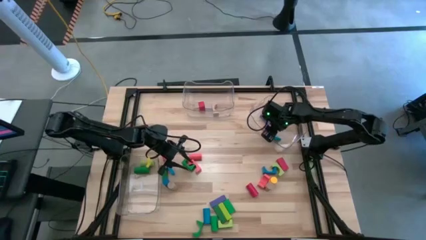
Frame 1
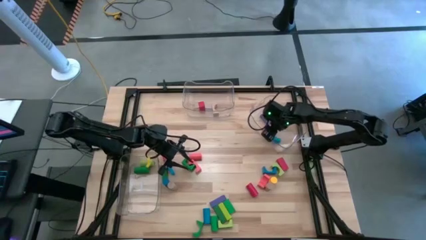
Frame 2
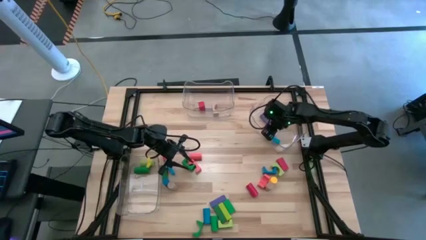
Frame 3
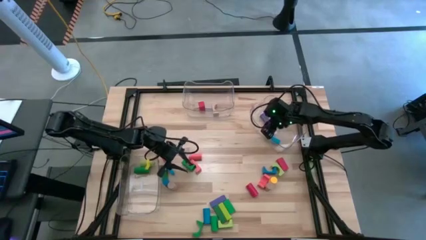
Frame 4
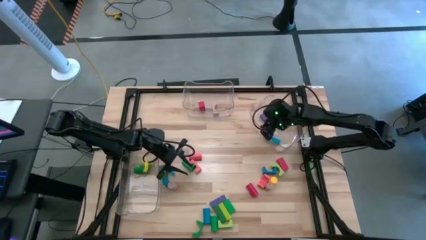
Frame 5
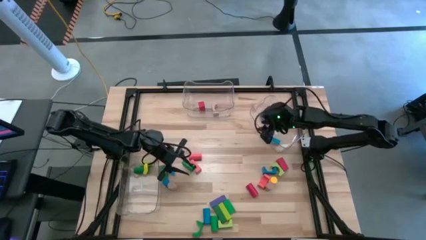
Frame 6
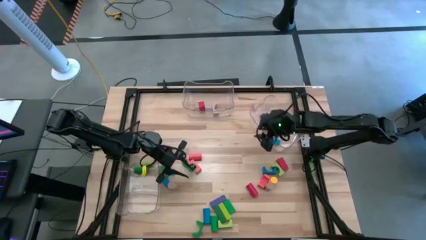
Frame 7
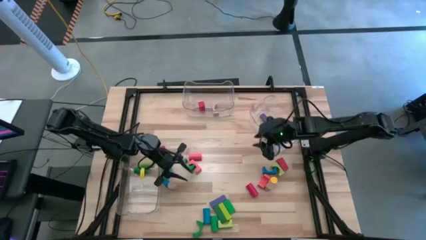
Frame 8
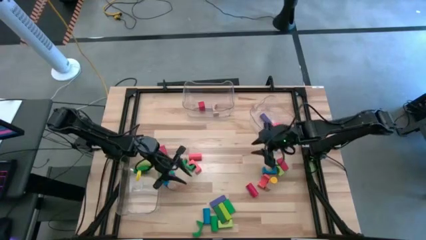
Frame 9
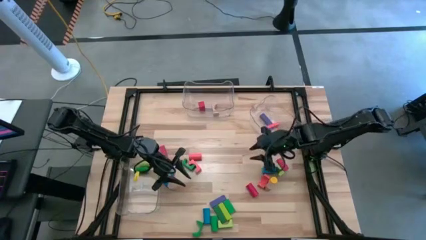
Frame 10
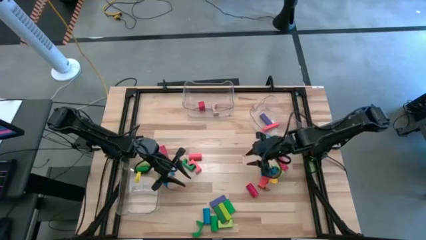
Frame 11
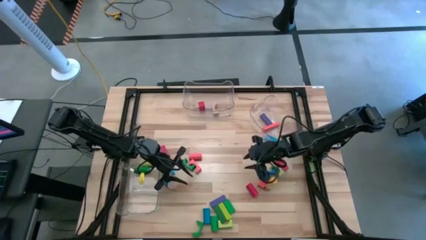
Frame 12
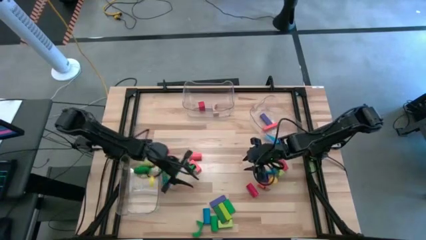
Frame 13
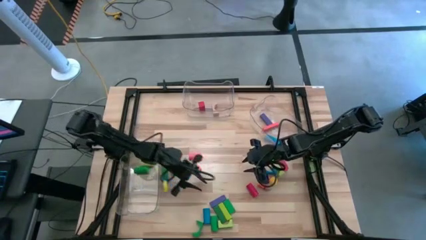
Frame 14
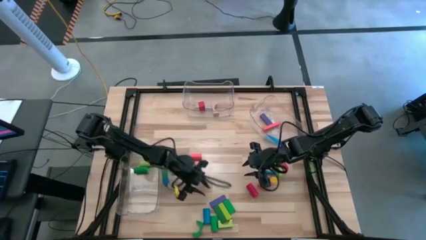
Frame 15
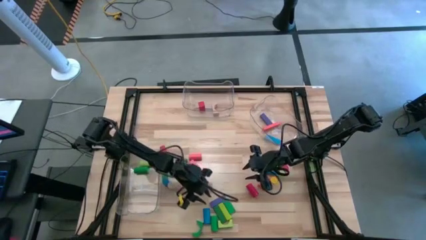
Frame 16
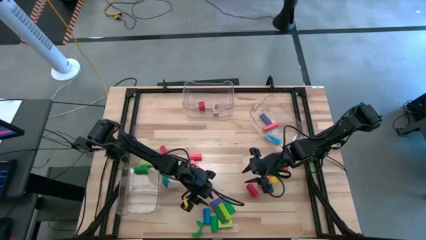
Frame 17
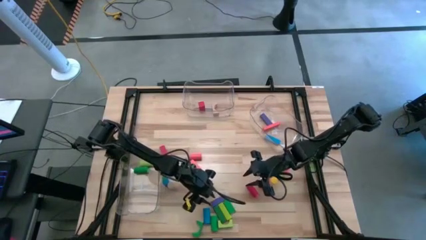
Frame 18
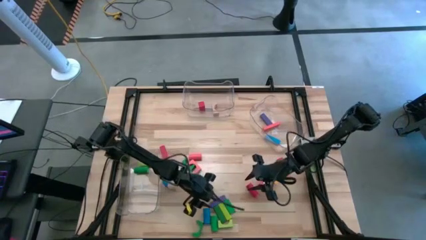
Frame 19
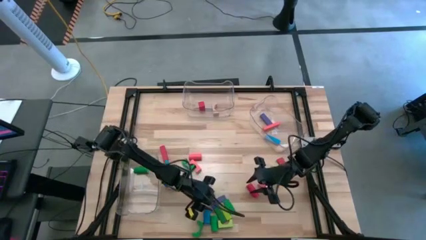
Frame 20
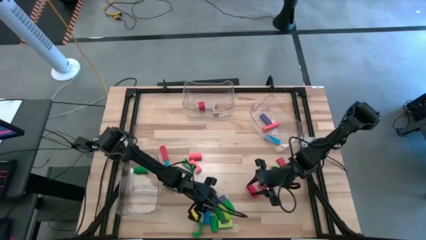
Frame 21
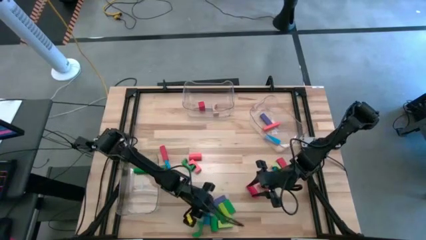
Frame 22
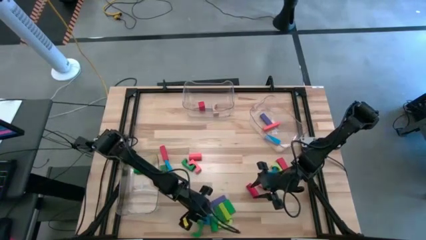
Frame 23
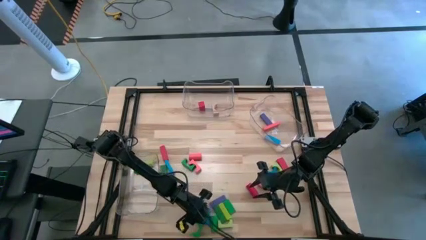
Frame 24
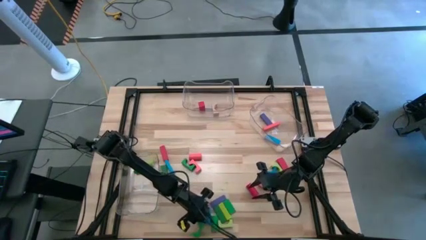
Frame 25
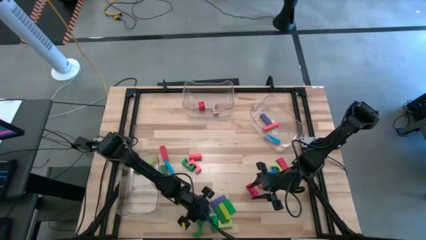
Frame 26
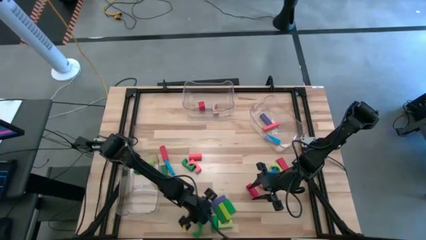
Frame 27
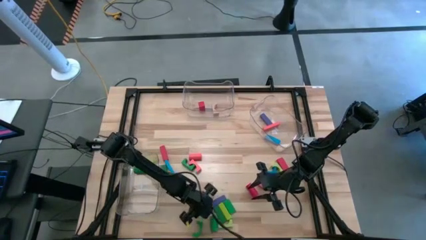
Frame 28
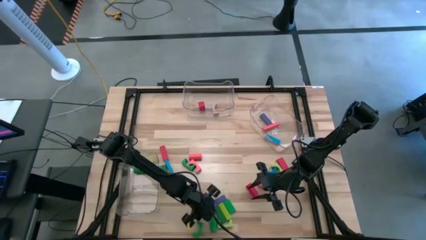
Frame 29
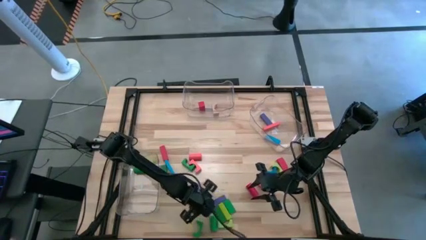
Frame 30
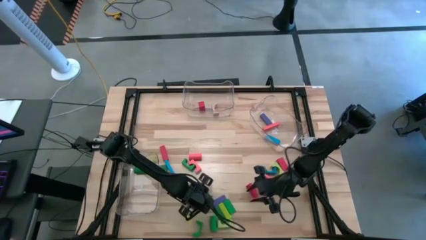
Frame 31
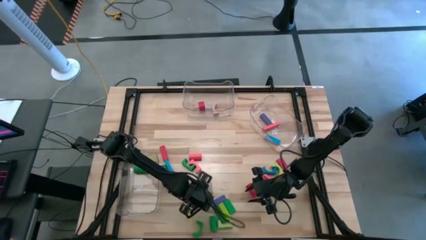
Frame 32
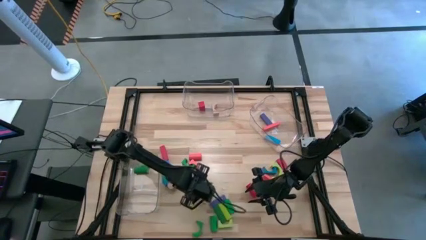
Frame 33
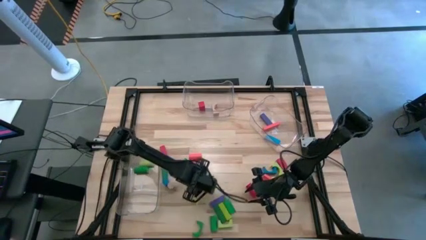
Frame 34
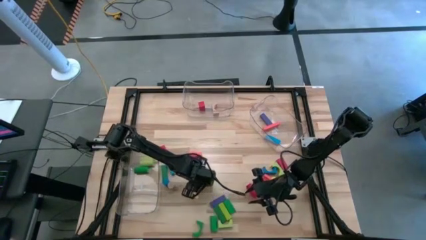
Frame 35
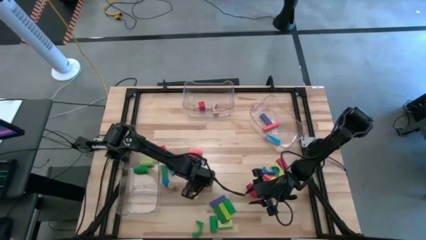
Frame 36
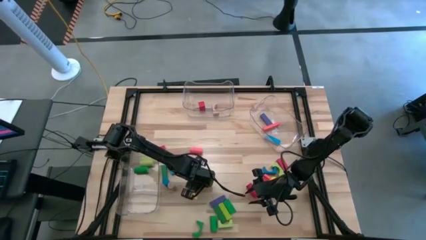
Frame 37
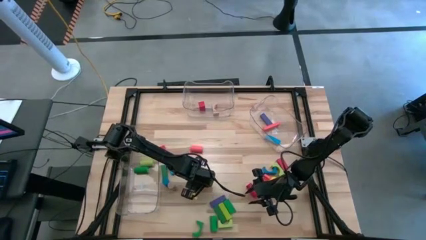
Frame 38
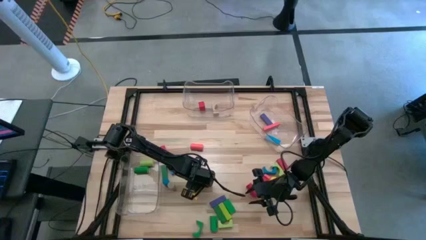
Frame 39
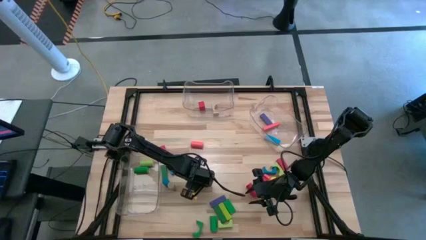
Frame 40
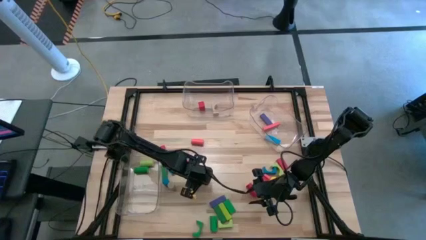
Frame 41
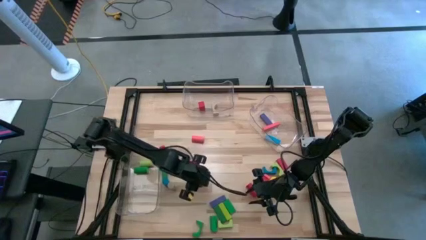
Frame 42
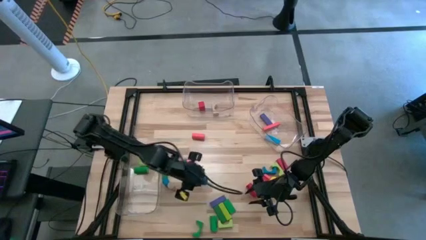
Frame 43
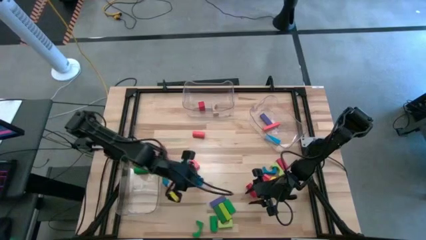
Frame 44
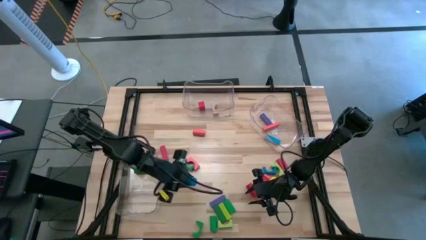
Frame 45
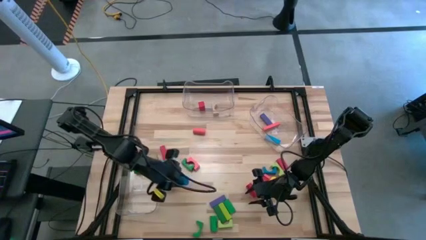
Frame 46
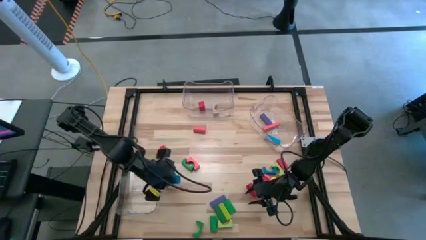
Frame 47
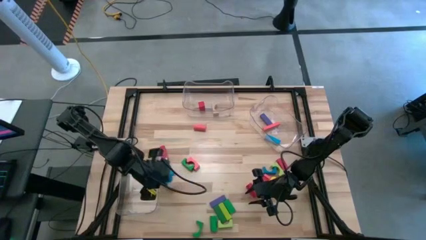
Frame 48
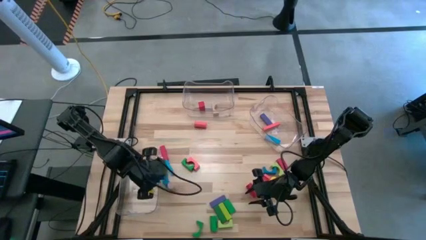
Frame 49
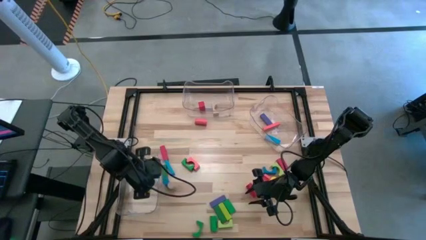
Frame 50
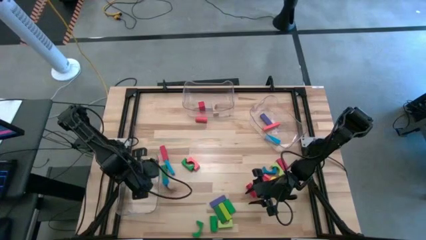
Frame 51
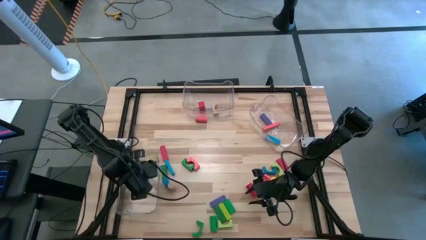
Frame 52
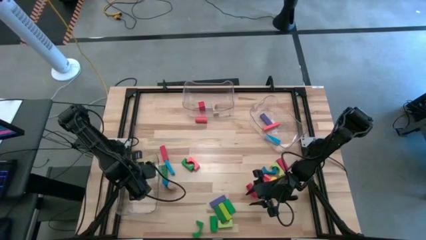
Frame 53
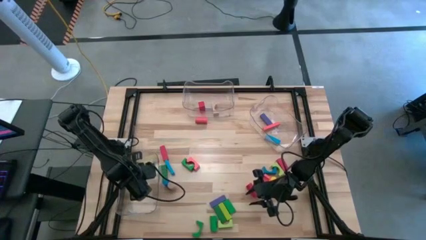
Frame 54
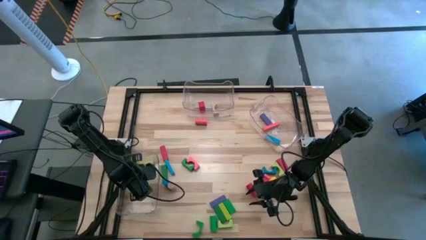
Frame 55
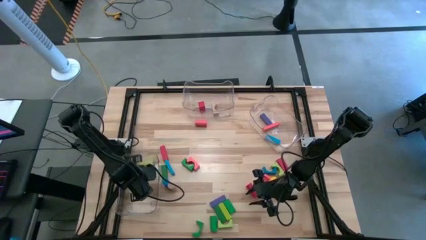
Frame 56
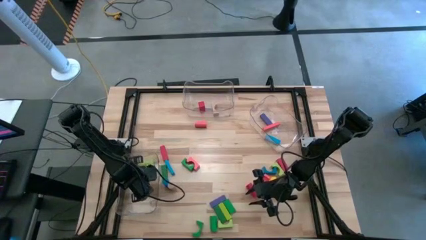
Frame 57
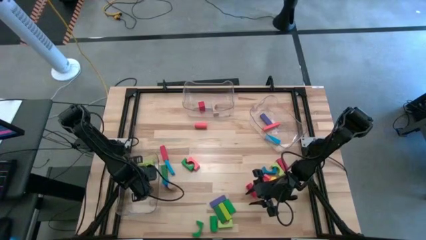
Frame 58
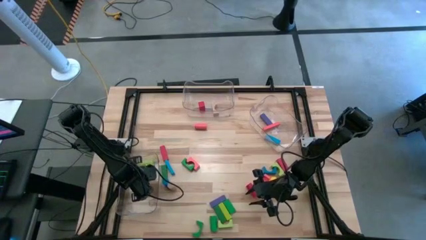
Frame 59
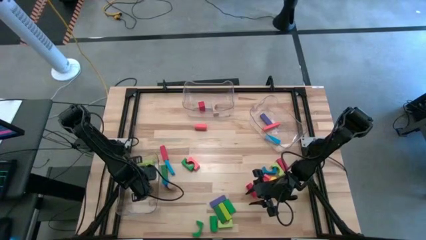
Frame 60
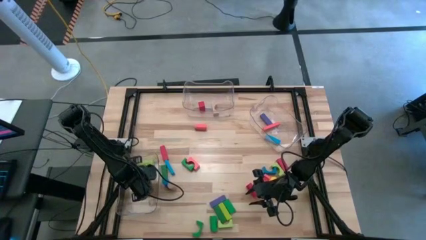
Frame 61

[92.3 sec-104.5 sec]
Task: Sort blocks by size
Put the blue cylindrical block into the left transparent bin

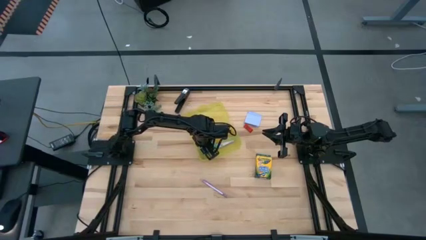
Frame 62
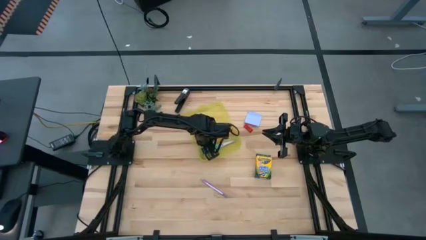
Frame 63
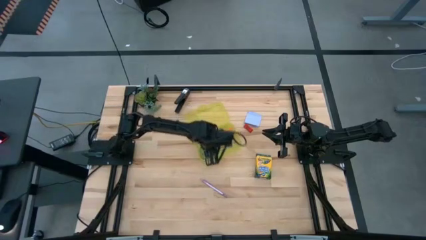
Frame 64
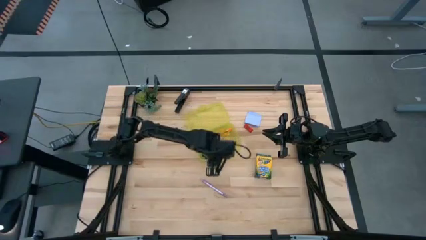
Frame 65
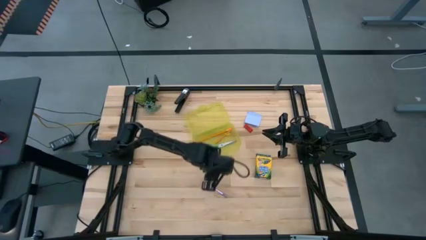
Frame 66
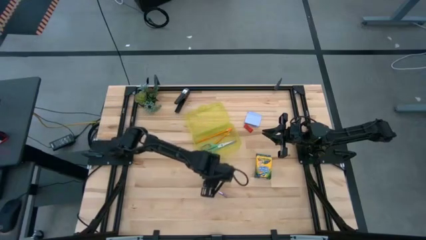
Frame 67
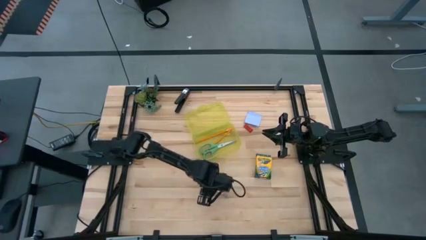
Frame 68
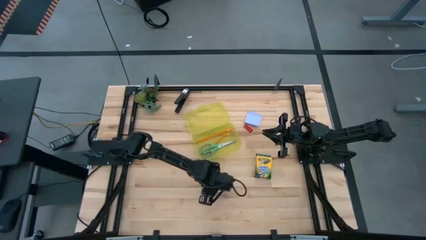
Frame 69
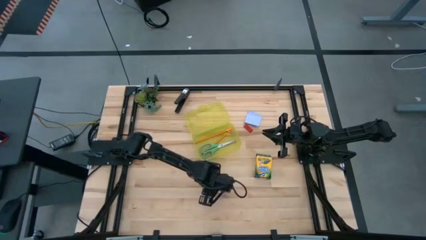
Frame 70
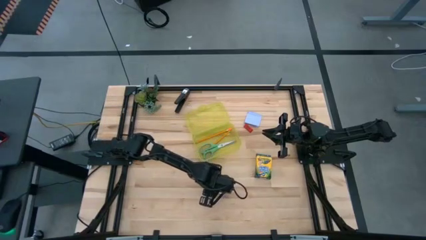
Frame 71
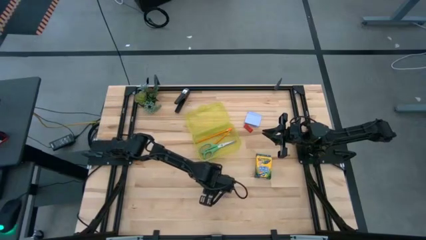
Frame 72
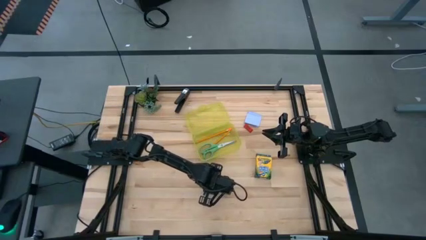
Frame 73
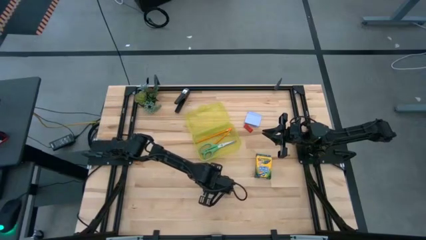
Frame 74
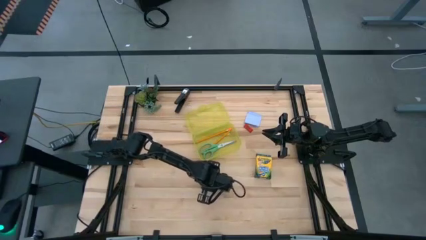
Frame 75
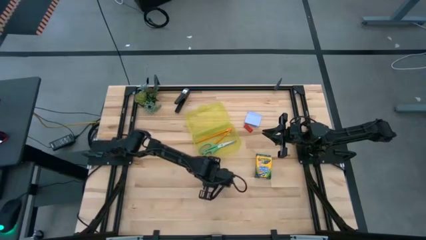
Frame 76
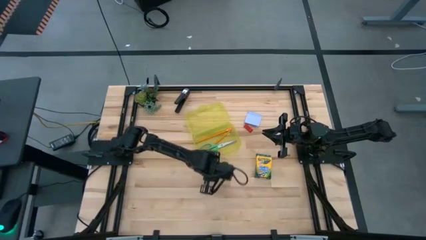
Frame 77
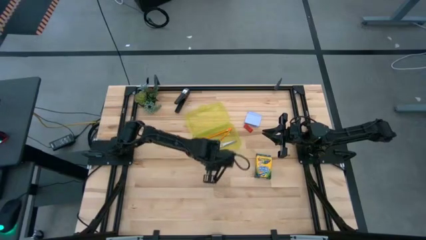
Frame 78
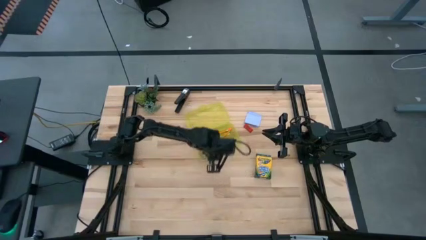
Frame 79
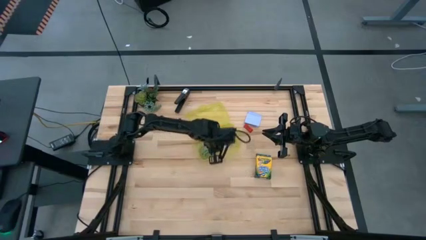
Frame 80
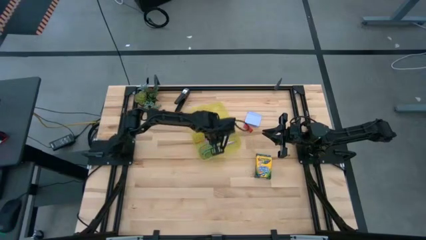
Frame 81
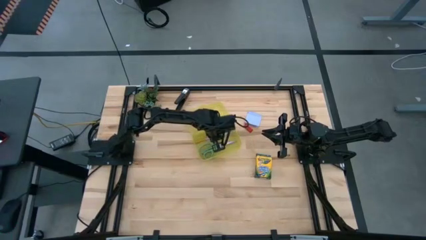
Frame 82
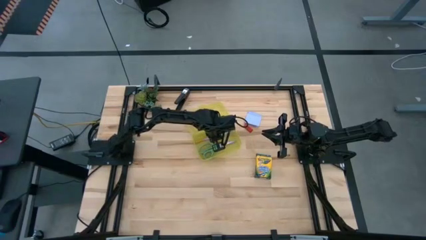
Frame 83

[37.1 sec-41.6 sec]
Task: Pack school essentials
Put the purple pen into the yellow supply box
